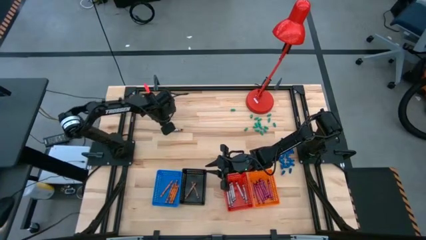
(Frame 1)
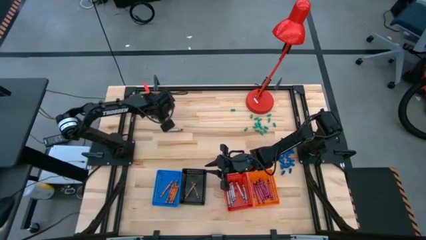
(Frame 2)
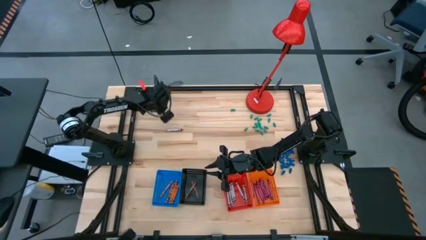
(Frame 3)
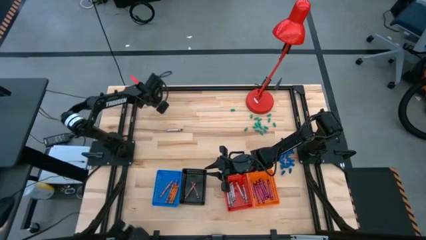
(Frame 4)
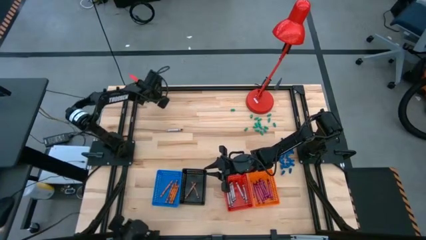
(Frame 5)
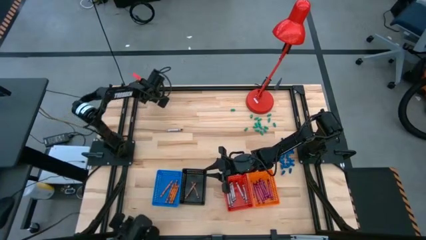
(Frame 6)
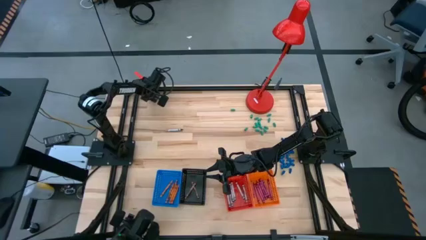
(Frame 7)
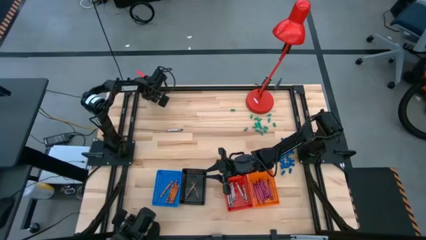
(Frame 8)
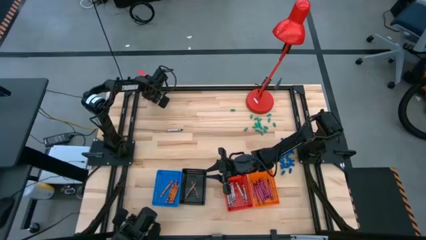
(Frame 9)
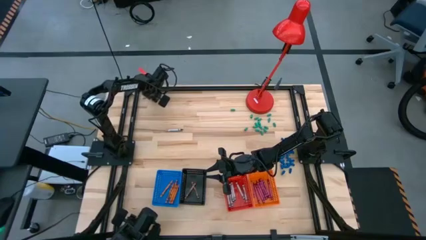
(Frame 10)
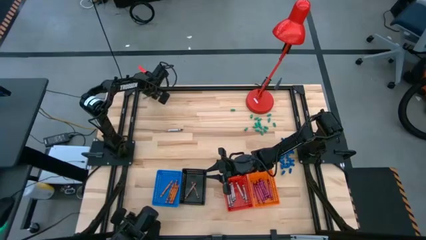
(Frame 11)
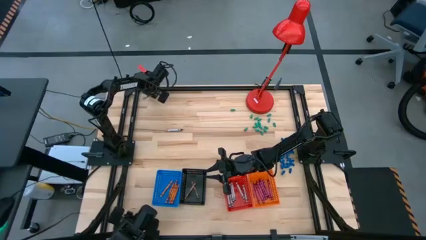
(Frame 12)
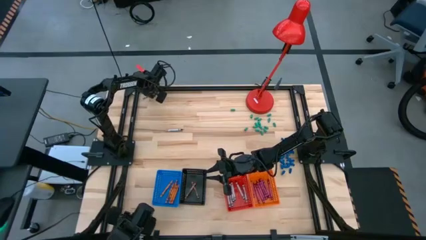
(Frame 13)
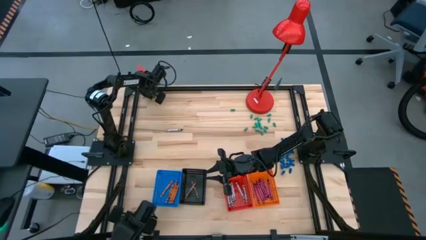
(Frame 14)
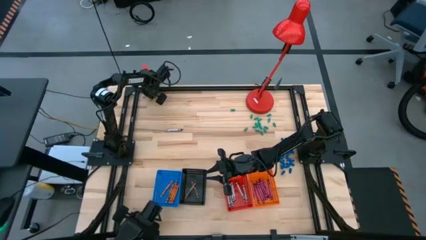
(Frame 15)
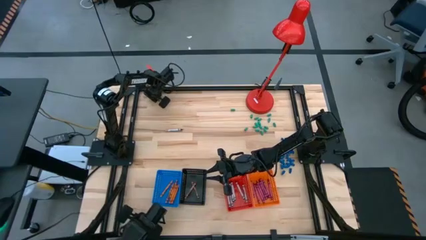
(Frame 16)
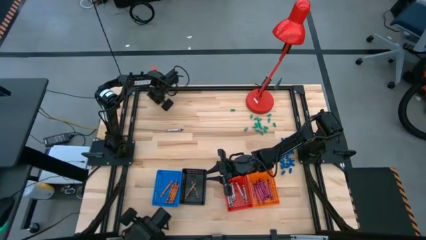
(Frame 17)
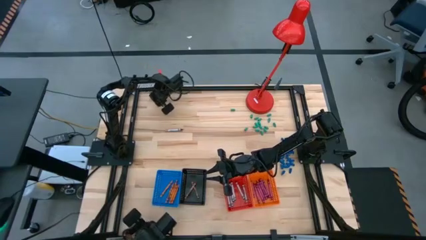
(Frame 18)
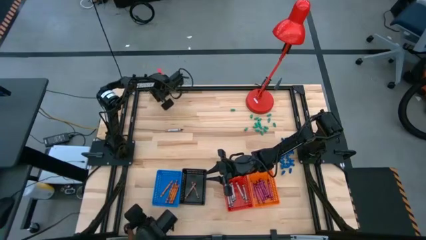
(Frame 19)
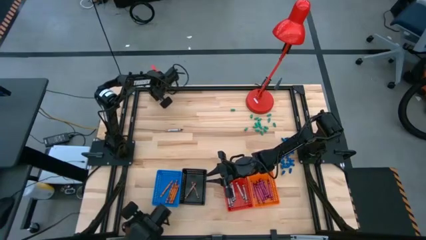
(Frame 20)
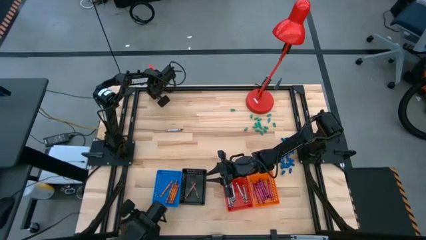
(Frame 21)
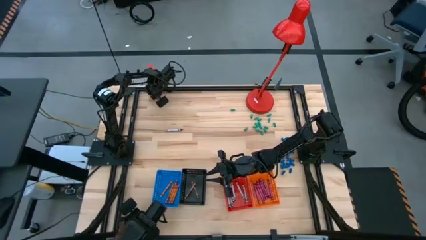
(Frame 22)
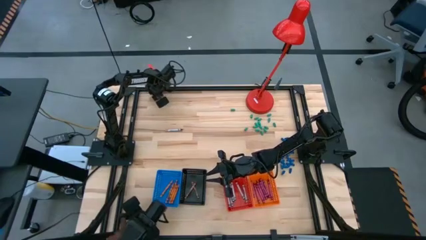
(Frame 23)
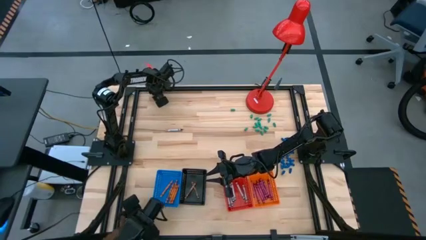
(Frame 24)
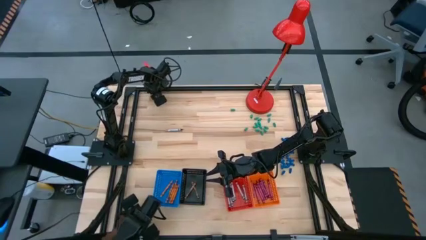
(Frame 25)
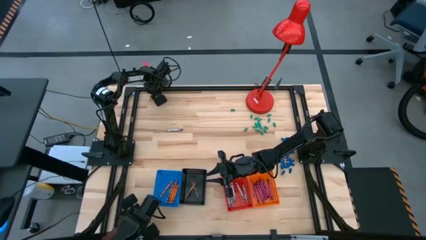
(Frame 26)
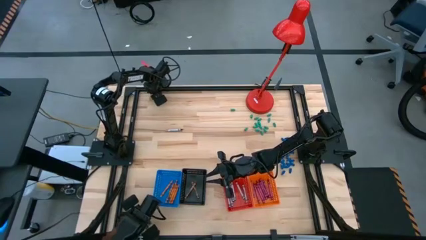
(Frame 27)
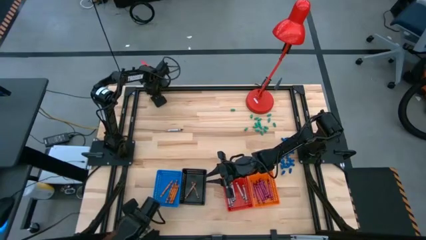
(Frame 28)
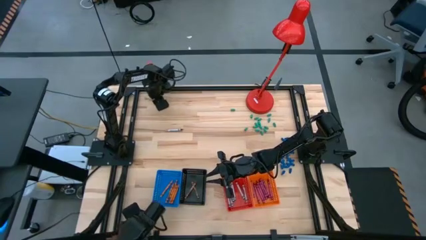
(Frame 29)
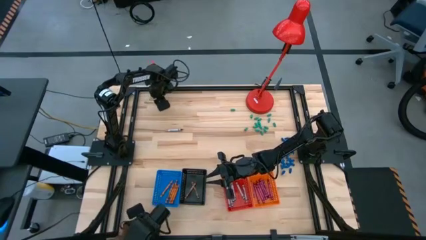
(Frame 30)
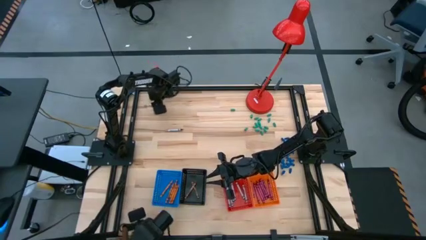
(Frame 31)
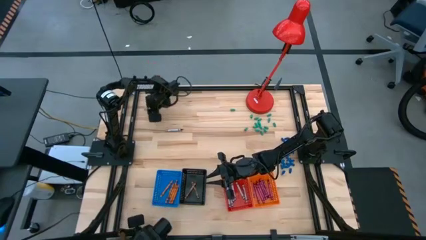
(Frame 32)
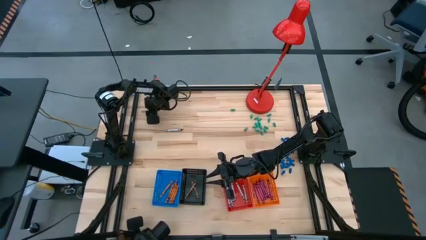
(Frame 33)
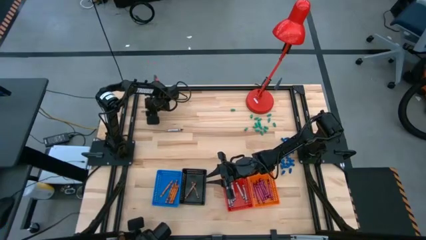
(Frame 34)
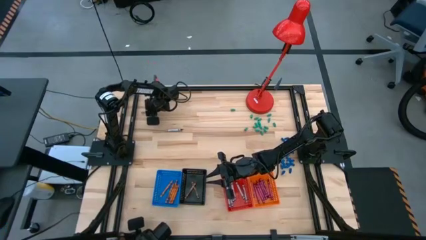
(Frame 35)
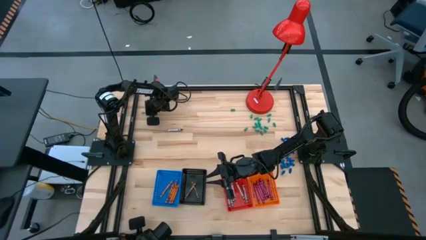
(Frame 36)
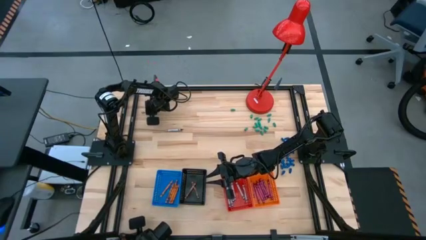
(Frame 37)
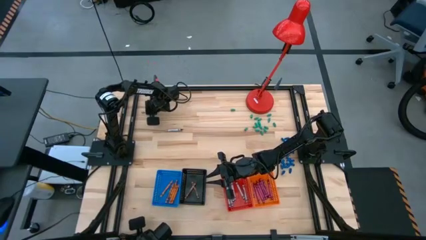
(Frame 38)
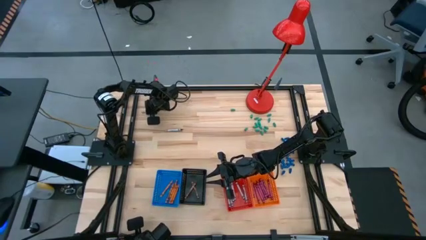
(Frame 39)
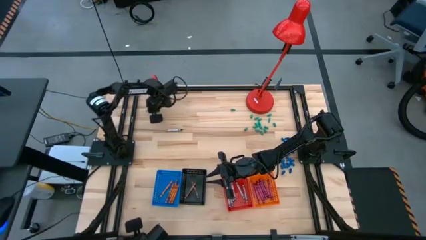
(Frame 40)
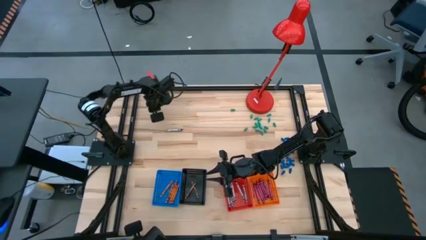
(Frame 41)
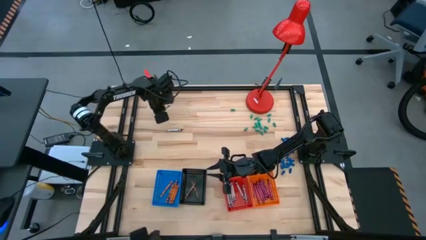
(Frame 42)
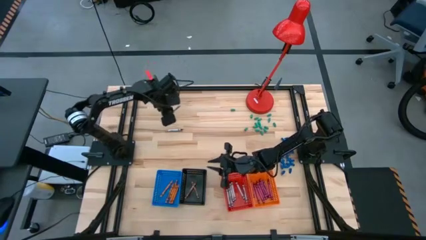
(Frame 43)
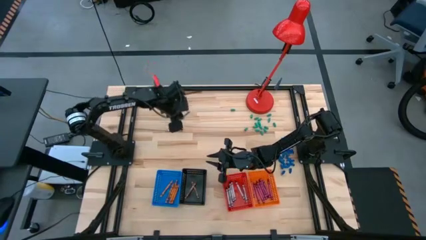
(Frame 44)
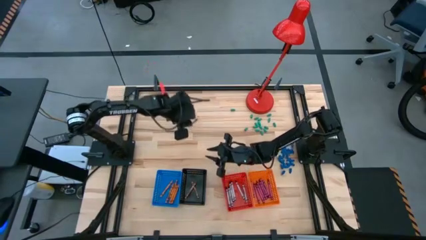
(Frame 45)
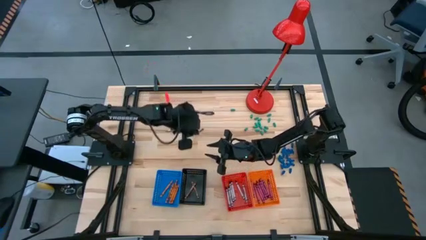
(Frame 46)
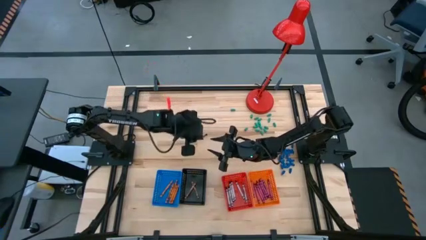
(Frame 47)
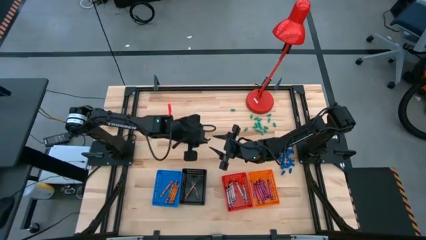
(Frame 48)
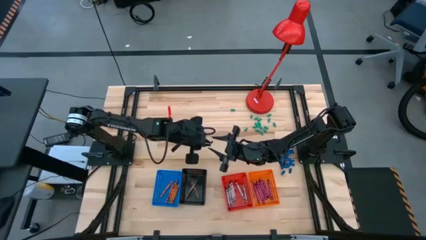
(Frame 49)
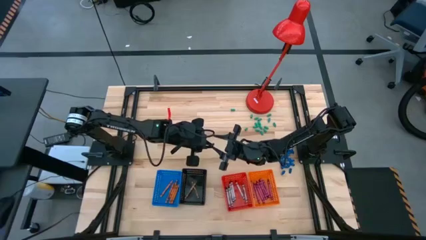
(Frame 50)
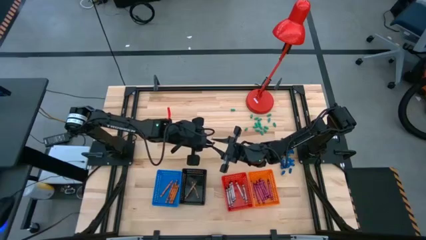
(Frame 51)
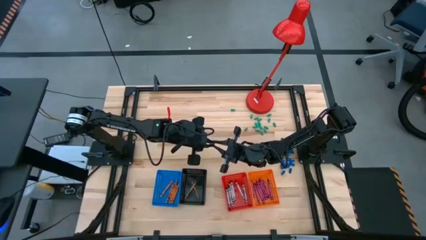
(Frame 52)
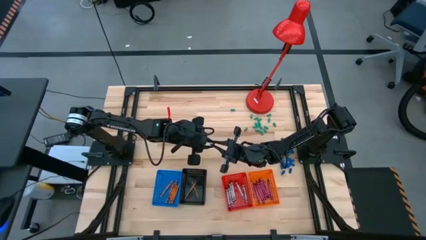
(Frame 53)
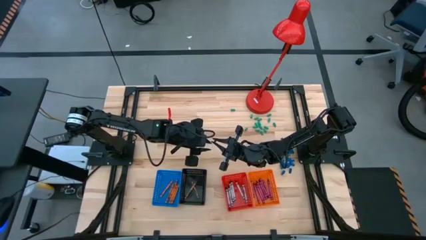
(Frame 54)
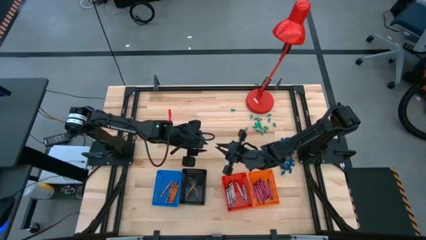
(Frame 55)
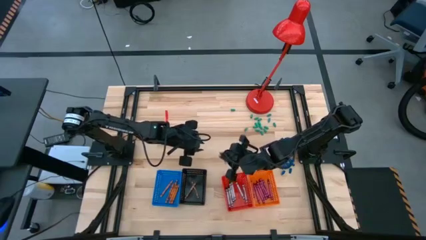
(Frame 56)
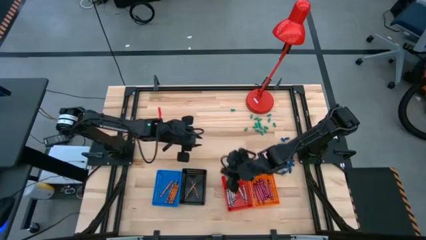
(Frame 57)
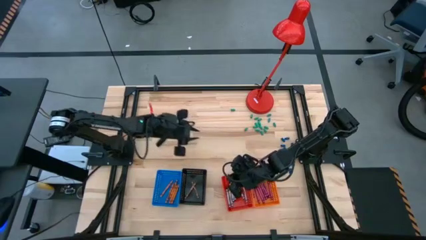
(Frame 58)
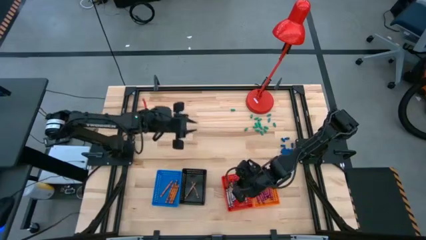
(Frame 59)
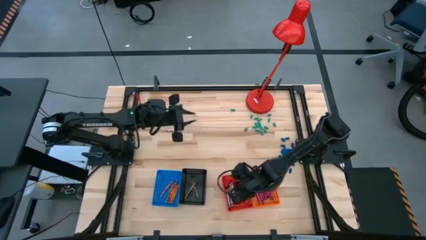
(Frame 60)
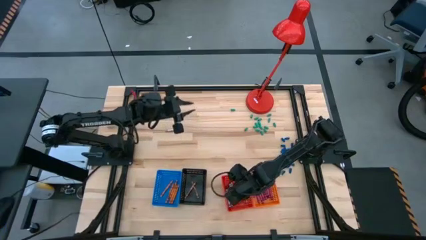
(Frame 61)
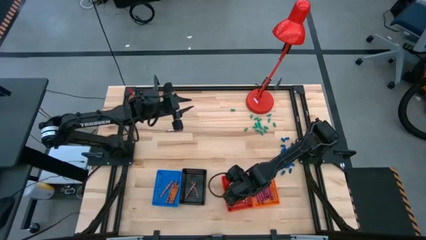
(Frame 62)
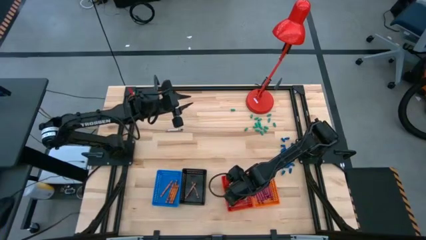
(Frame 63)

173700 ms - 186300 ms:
Task: Sort crayons
Put the black crayon into the red basket

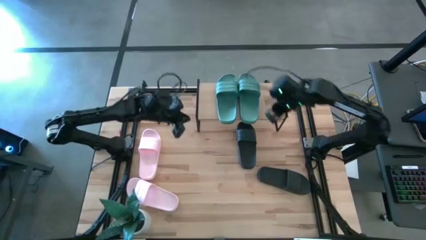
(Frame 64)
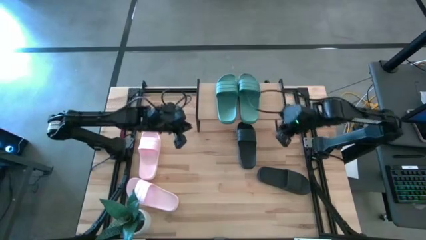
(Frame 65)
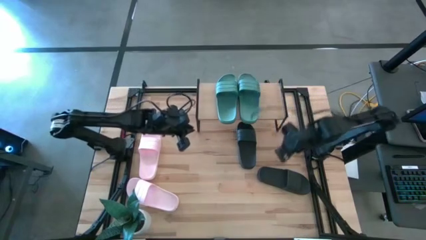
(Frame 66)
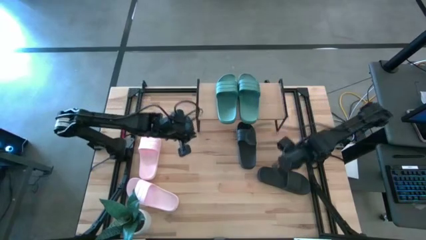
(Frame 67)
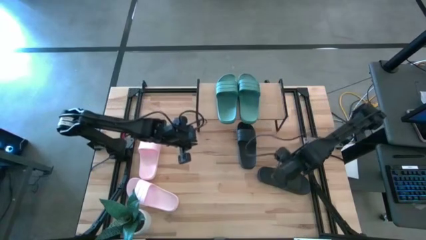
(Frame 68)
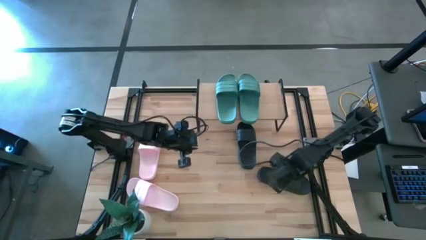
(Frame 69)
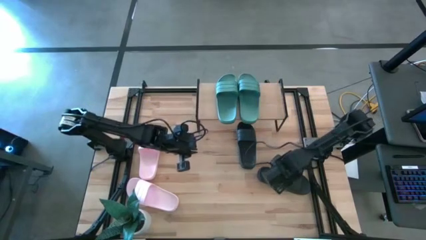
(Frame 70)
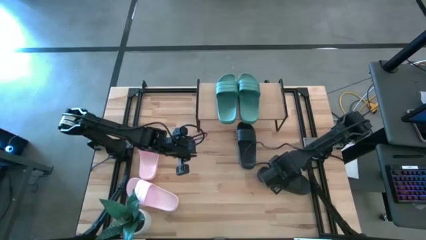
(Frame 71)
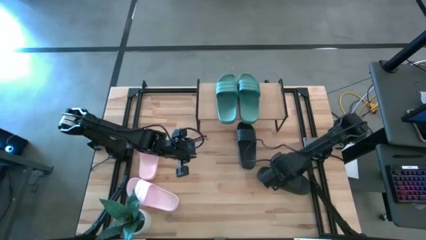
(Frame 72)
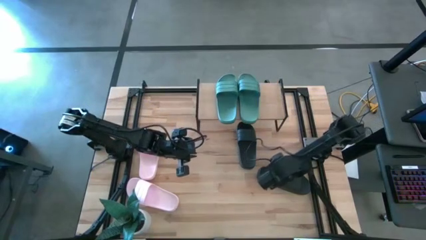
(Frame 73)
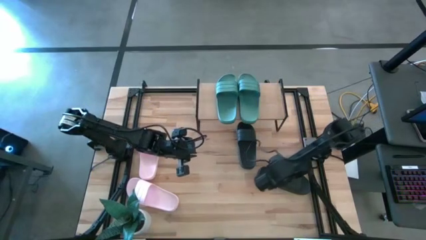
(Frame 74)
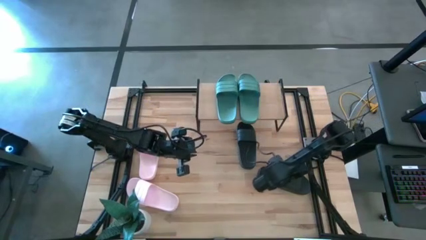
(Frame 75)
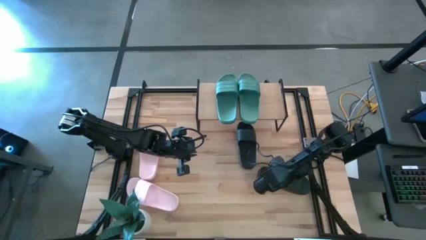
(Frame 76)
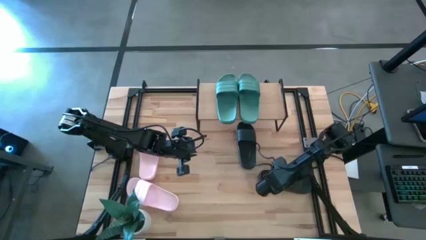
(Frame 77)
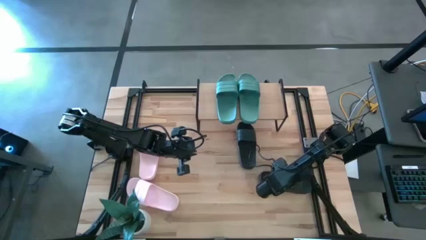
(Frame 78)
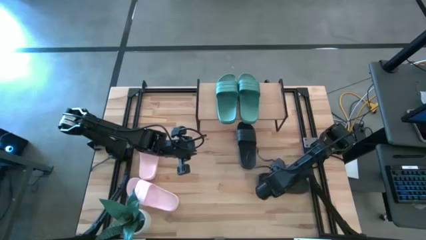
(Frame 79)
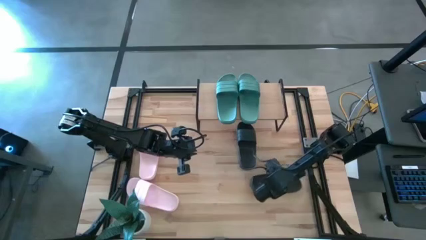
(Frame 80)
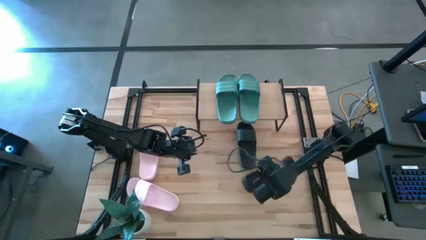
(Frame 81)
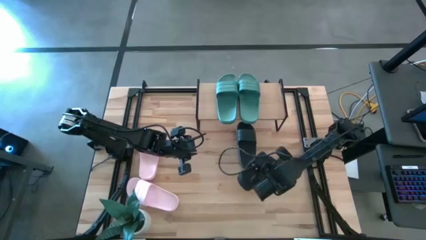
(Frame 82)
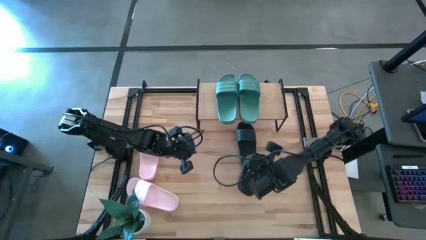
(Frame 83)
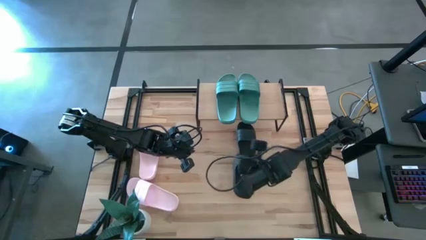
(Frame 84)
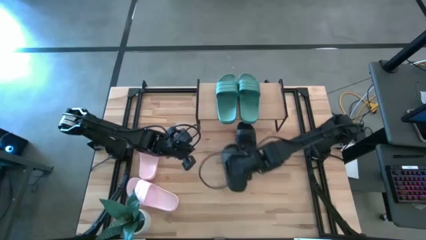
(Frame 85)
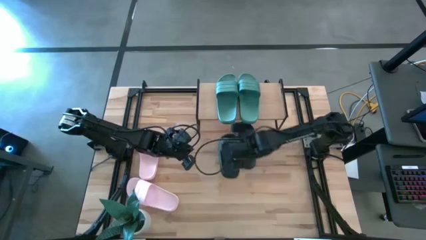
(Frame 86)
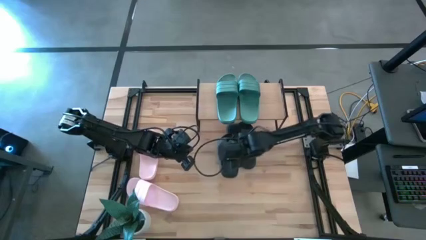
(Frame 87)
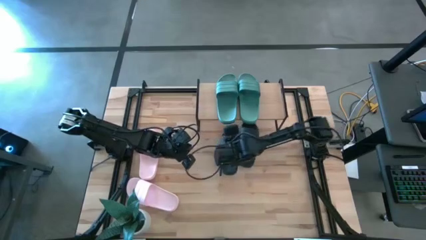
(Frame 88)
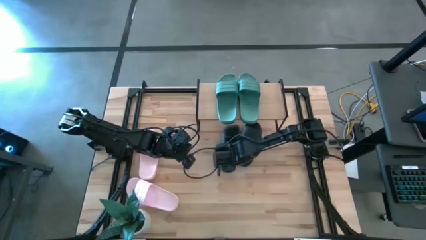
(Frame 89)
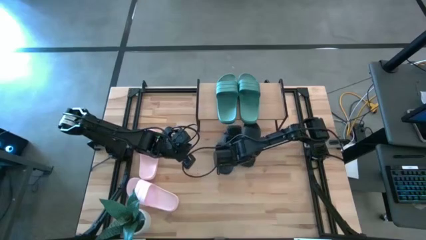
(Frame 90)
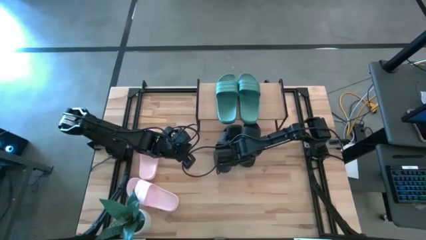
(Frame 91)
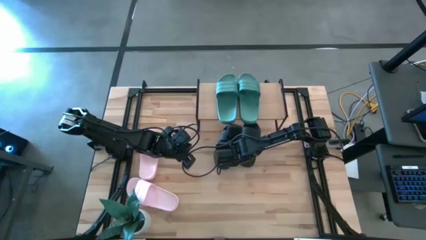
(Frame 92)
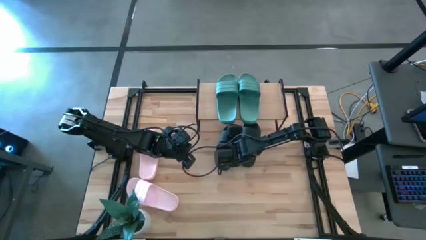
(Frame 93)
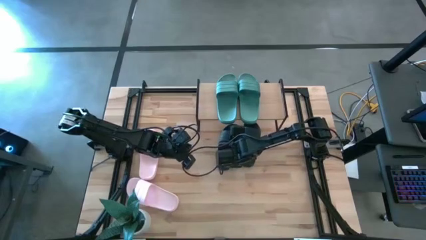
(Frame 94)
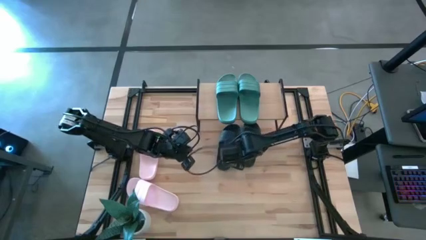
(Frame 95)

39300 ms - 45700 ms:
Task: Pick and place slides into the shelf
Put the black slides under the shelf
